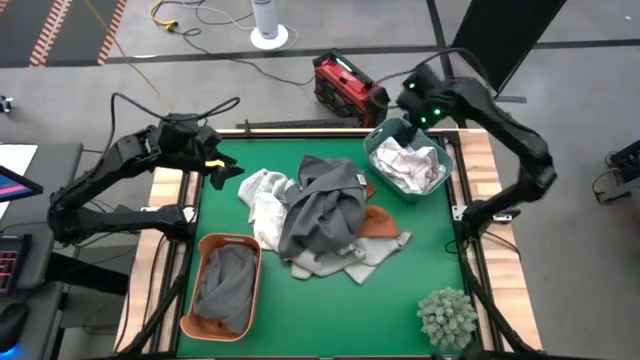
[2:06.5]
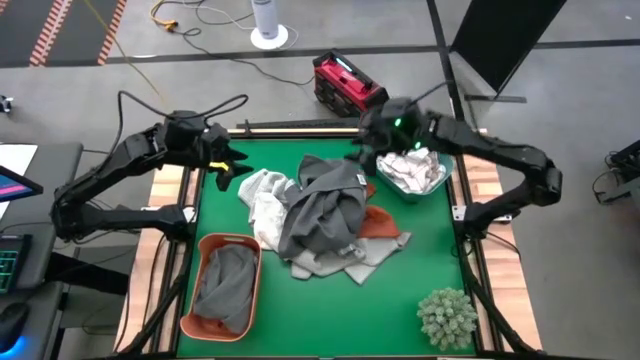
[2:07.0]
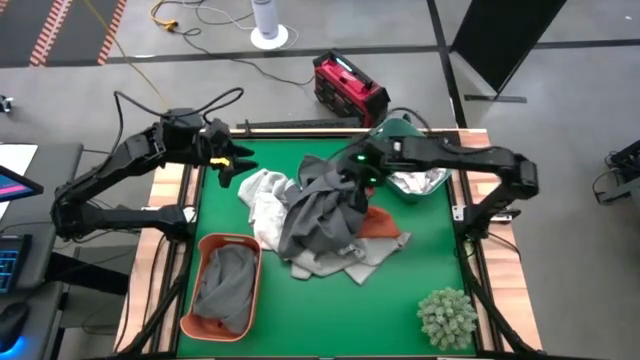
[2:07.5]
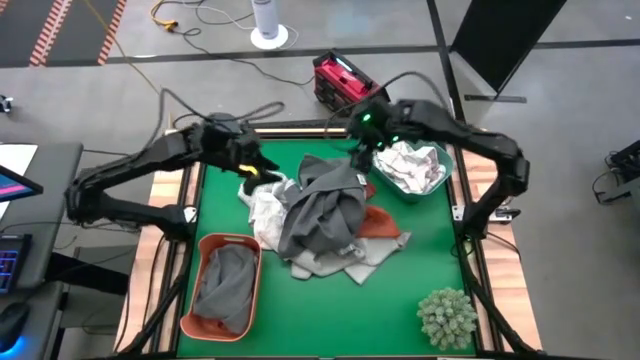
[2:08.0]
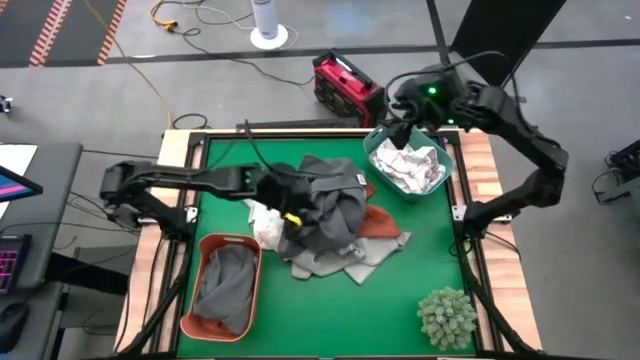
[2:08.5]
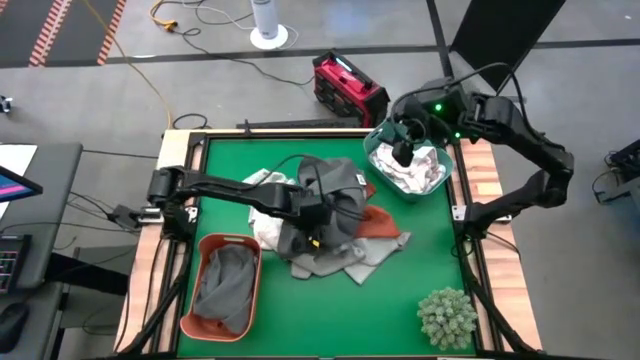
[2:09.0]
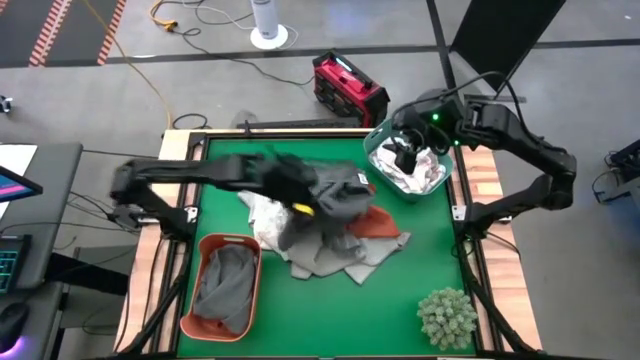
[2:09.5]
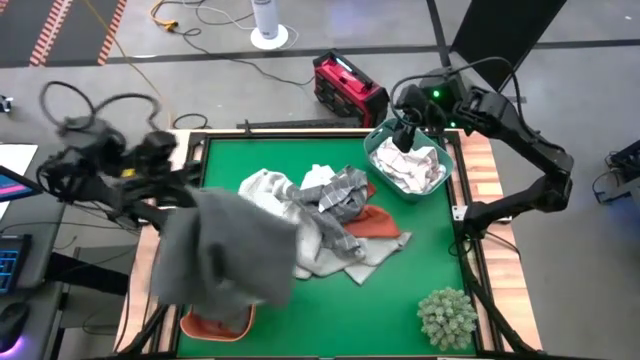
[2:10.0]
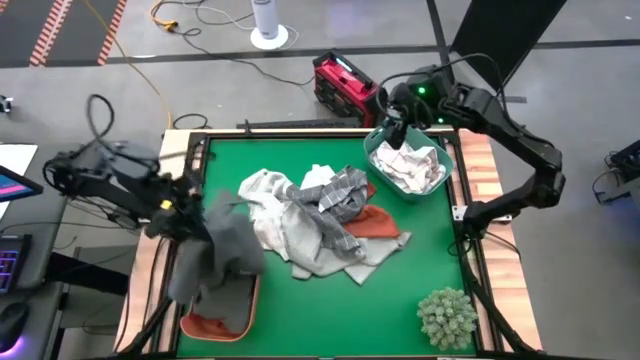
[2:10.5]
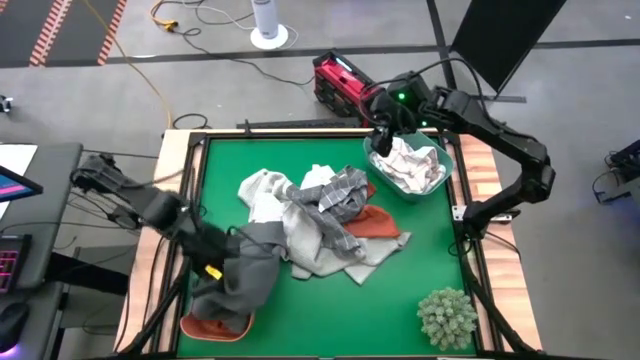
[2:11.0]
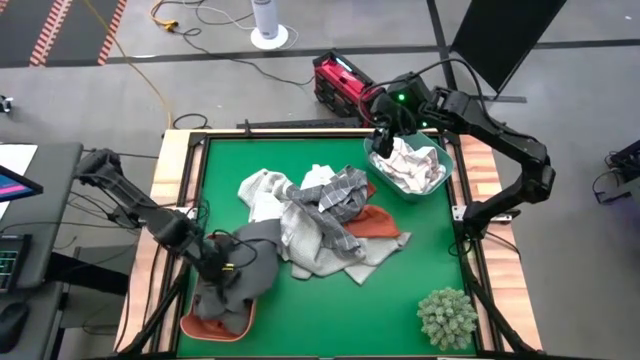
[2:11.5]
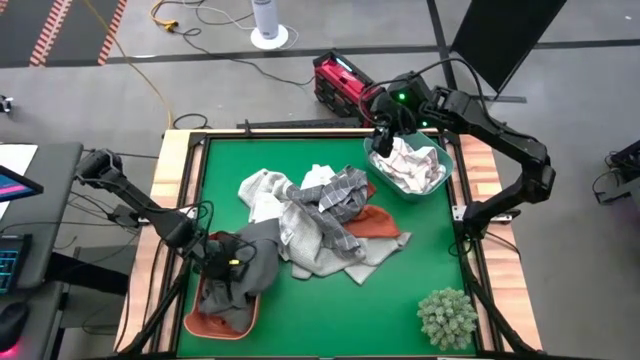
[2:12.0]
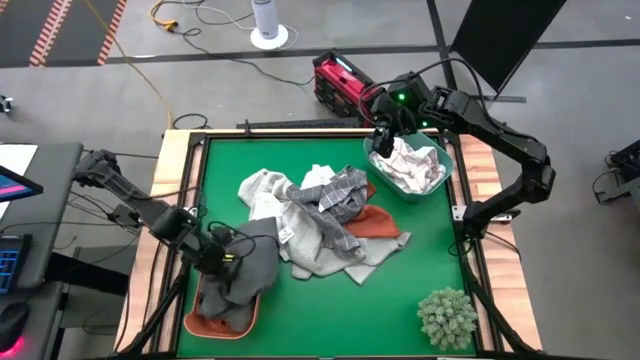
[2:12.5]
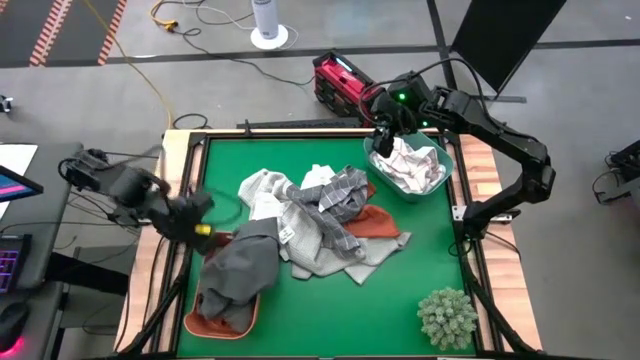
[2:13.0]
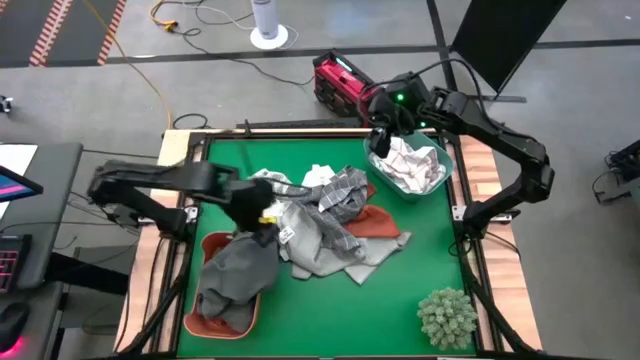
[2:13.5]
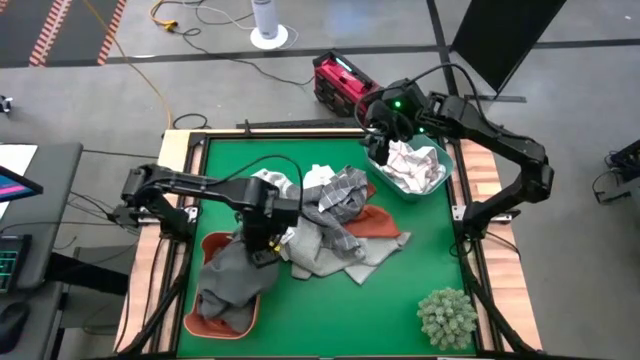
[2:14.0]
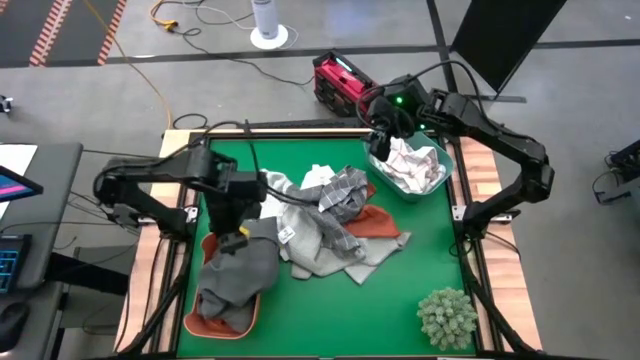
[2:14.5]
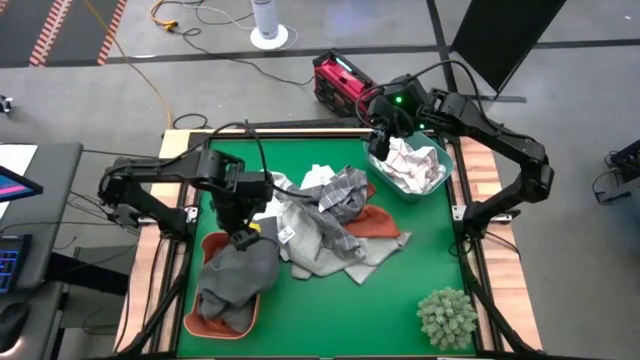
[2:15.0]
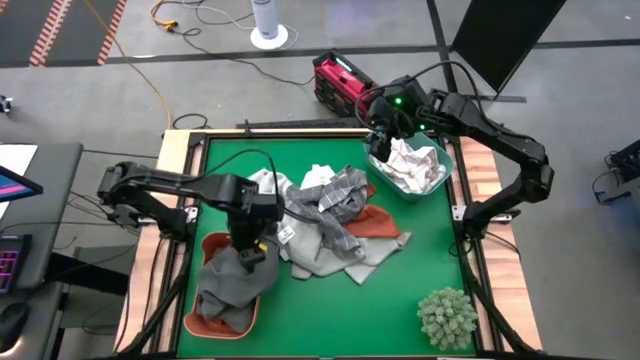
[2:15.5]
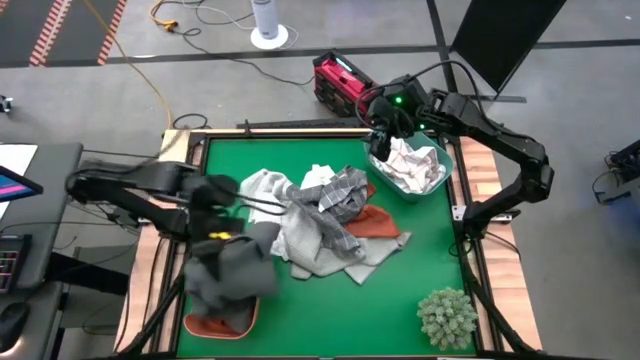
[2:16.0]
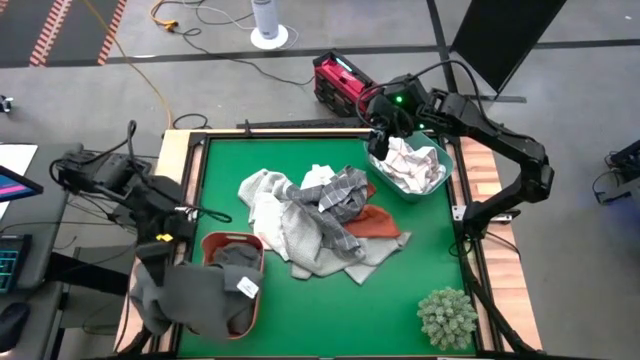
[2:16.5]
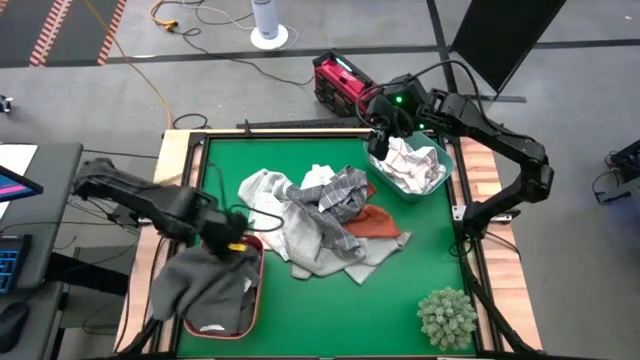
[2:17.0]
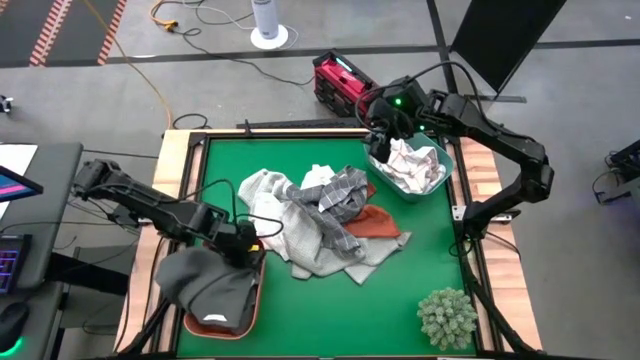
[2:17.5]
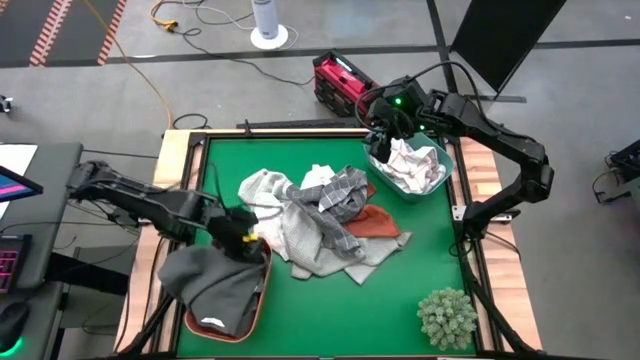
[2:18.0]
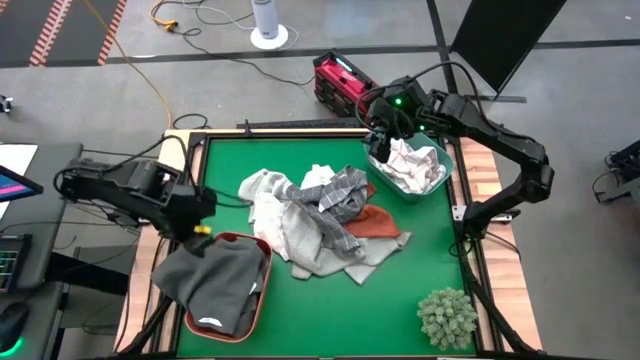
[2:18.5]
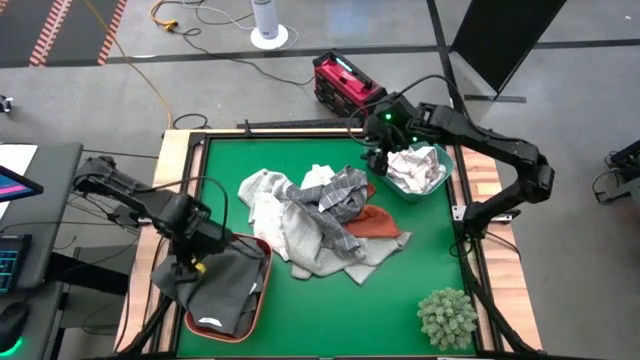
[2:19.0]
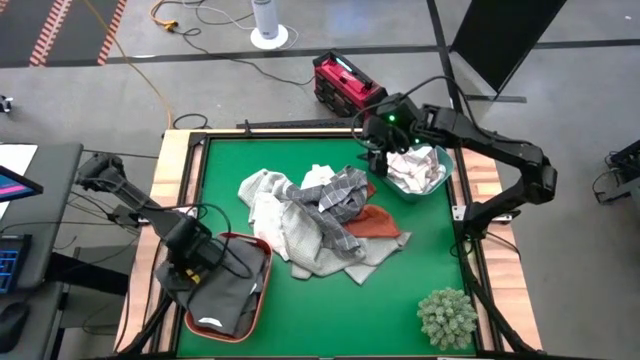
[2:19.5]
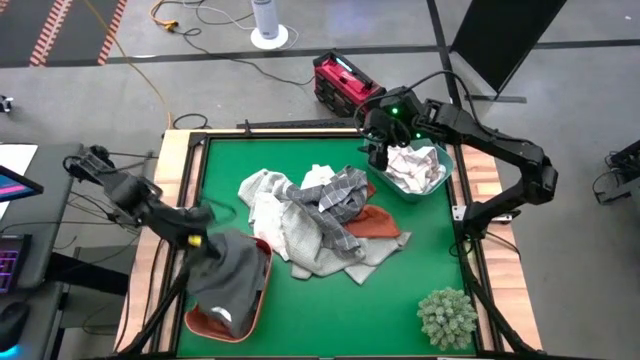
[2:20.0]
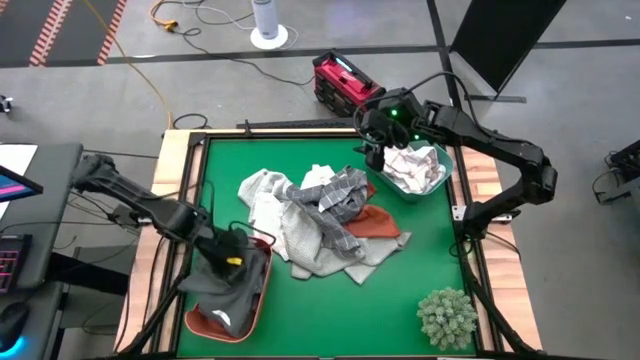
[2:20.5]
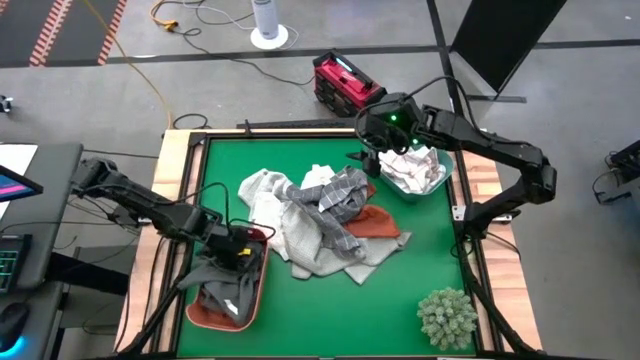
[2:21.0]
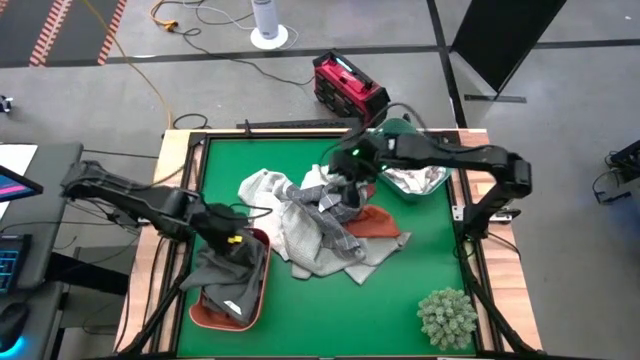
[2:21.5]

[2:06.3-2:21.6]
Task: Sort towels by color in basket
Put the gray towel into the orange bin

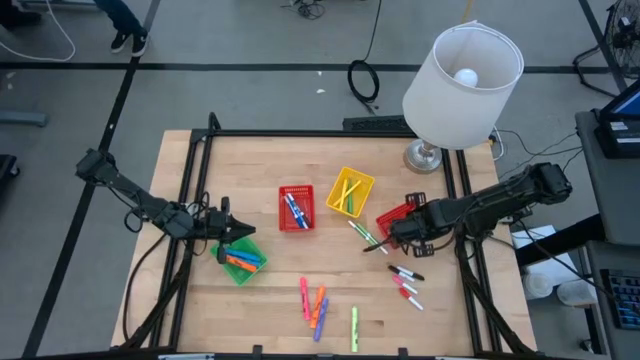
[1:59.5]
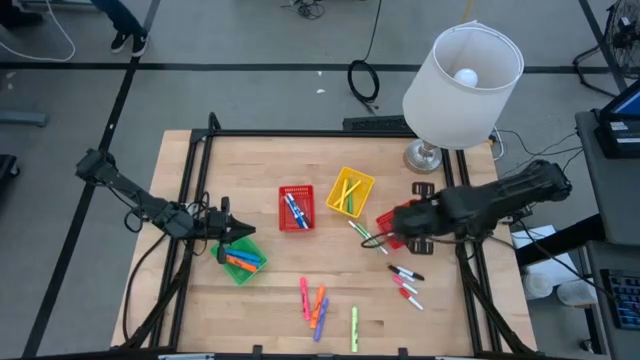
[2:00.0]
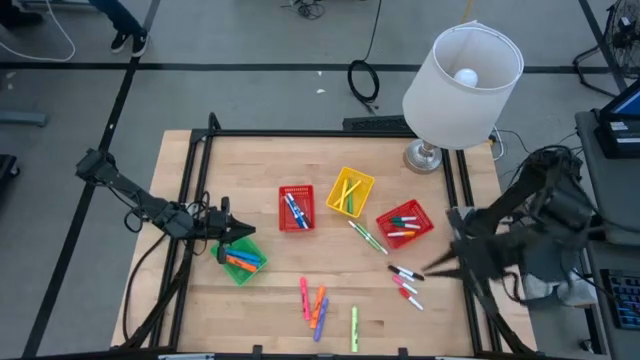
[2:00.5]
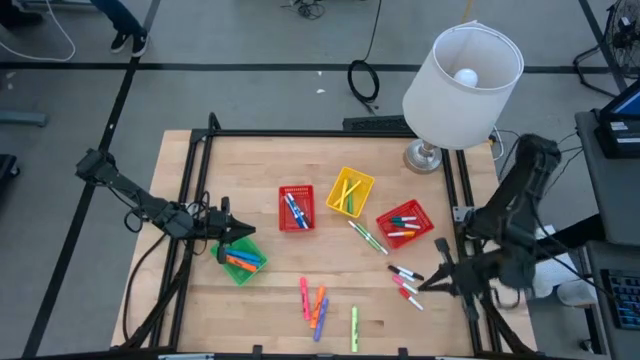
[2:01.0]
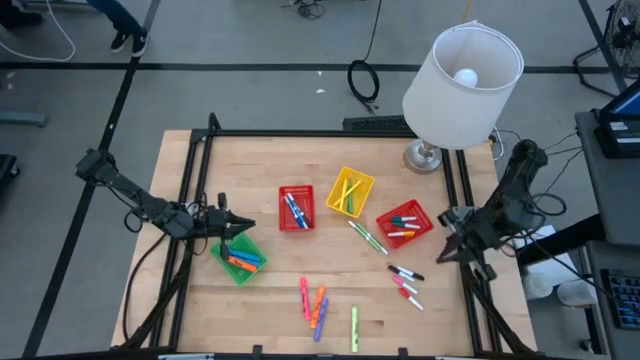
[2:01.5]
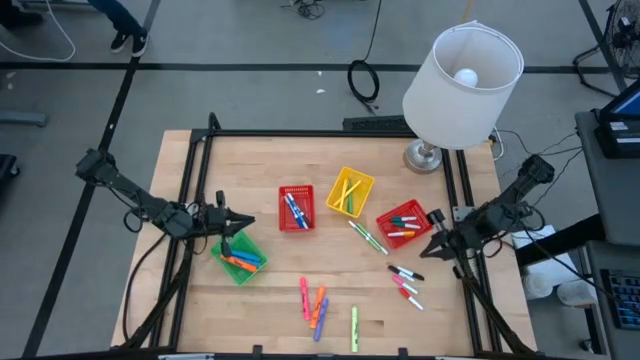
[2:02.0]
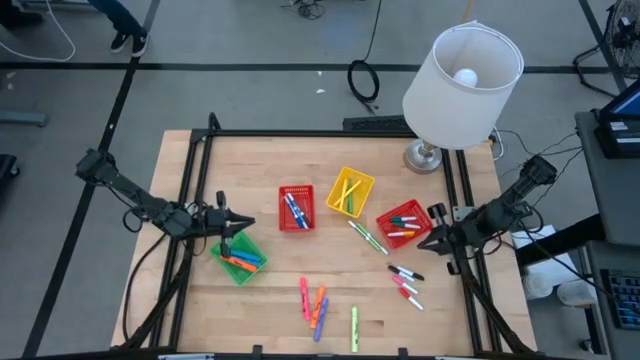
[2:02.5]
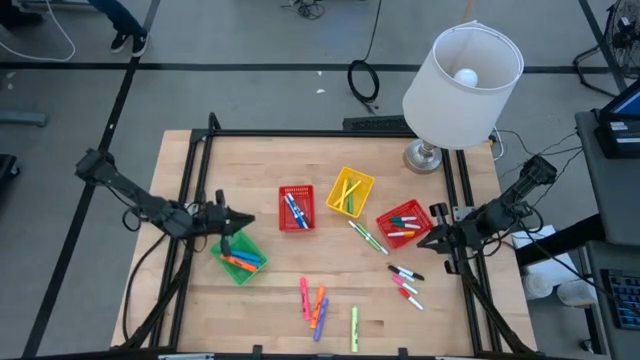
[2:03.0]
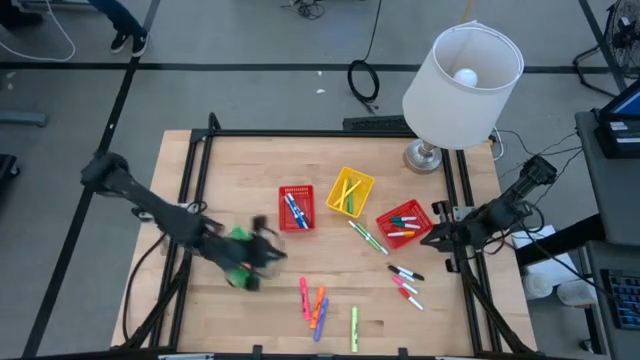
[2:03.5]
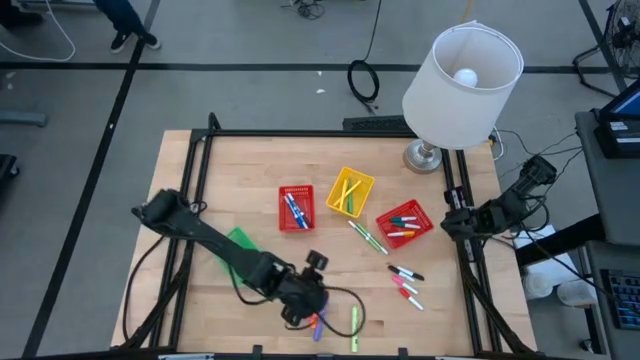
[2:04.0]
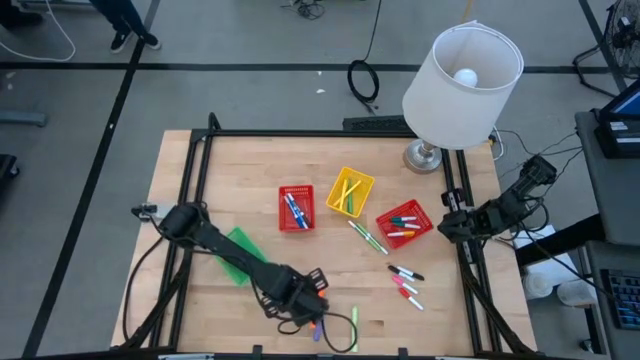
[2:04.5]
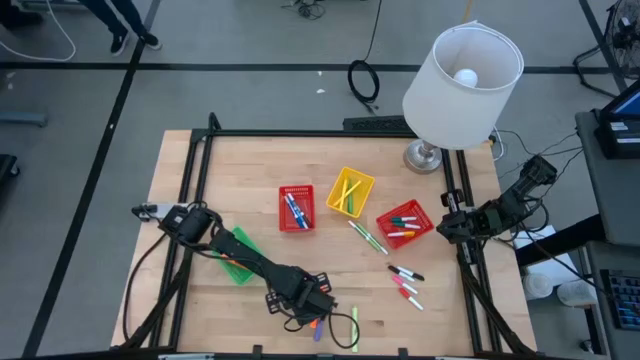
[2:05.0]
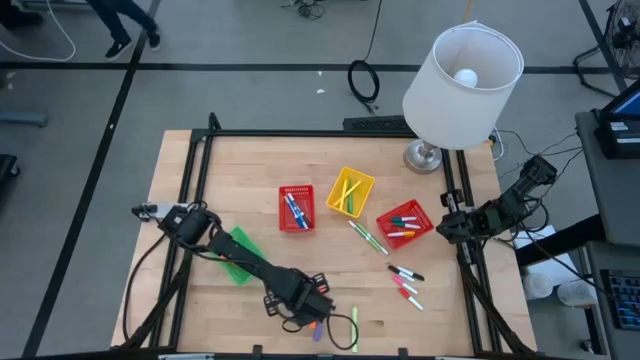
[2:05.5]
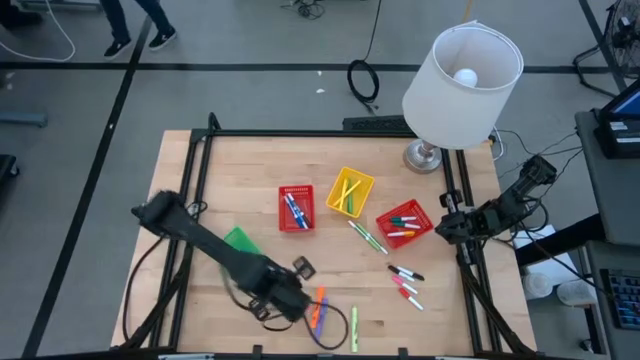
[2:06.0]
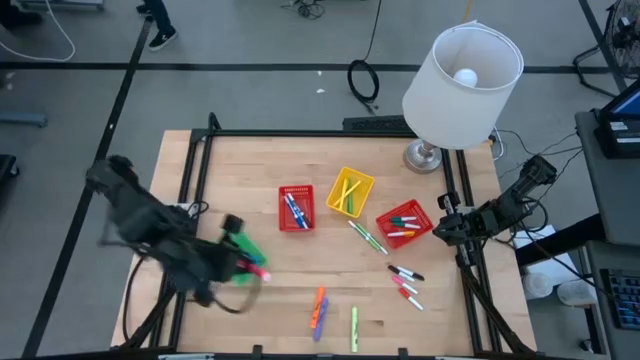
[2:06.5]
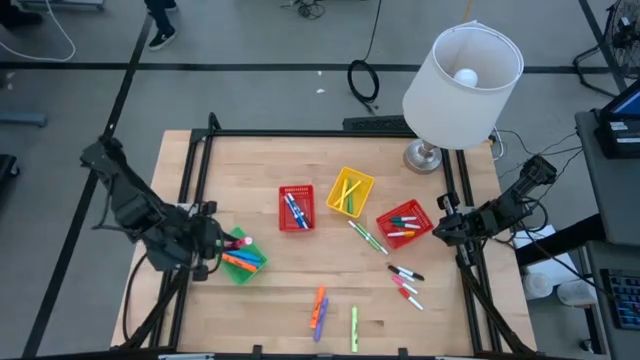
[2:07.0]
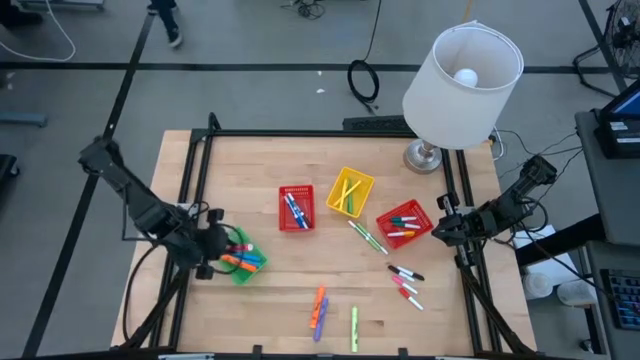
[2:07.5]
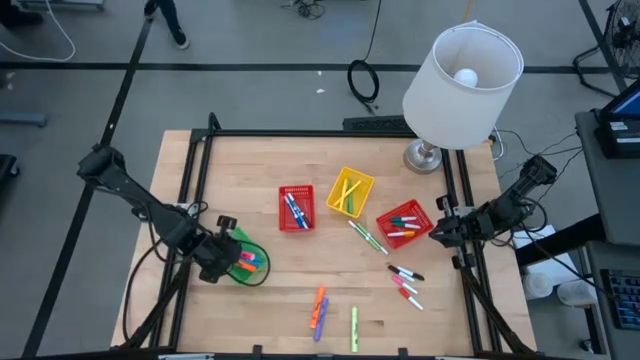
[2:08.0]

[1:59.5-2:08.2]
Task: Pick & Place Markers
Put the large pink highlighter pen into the green bin
